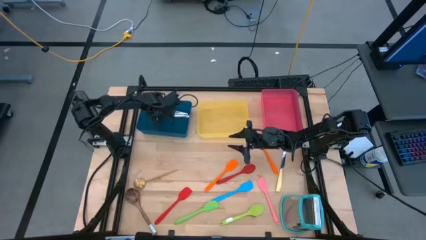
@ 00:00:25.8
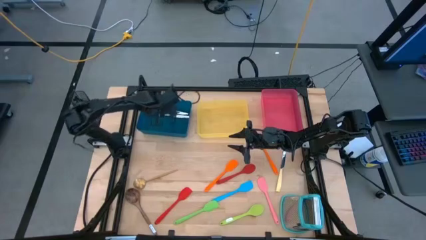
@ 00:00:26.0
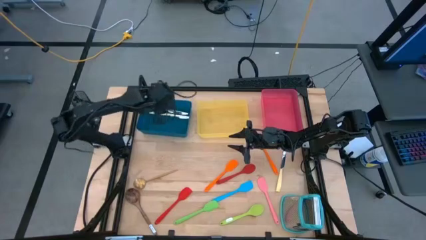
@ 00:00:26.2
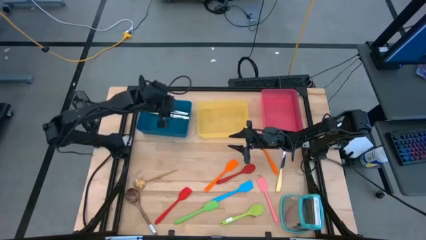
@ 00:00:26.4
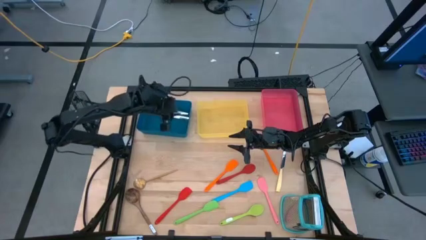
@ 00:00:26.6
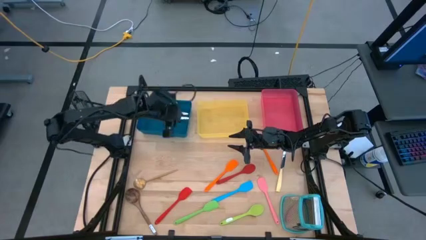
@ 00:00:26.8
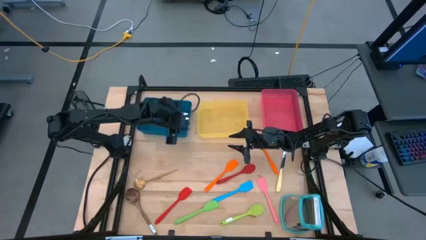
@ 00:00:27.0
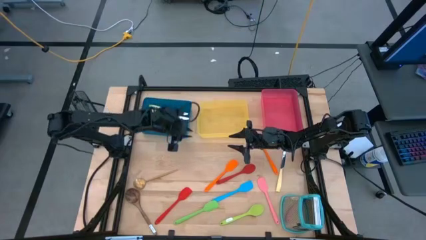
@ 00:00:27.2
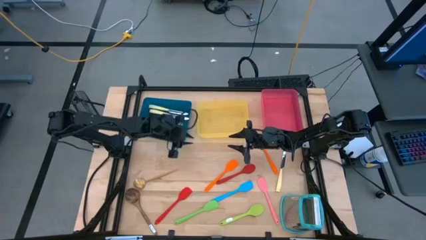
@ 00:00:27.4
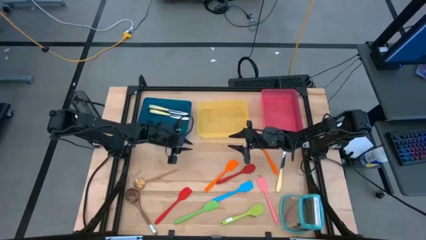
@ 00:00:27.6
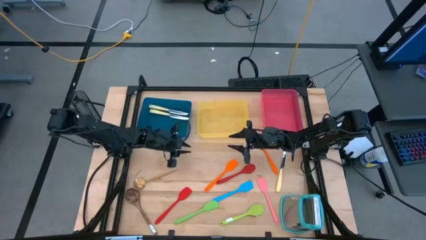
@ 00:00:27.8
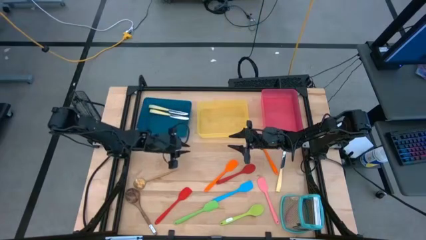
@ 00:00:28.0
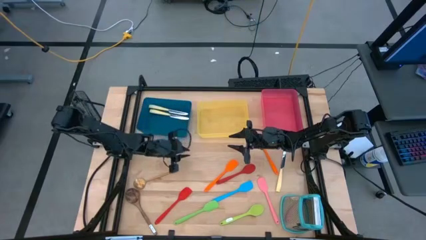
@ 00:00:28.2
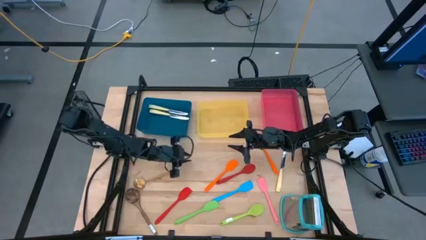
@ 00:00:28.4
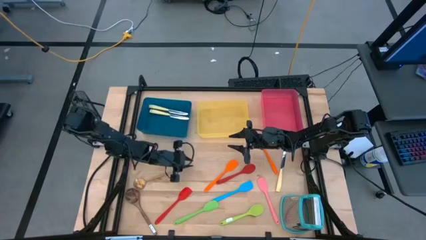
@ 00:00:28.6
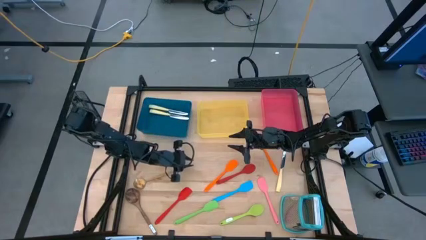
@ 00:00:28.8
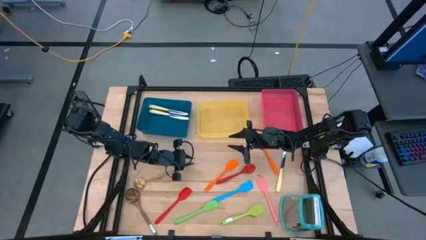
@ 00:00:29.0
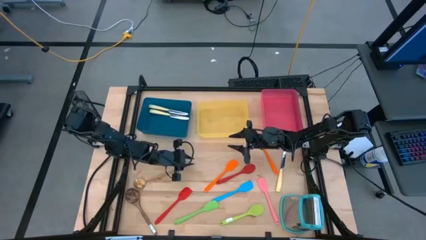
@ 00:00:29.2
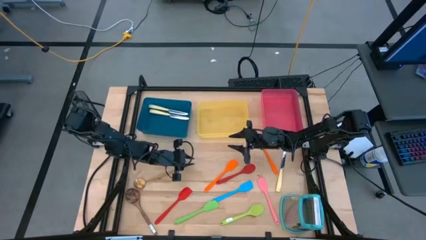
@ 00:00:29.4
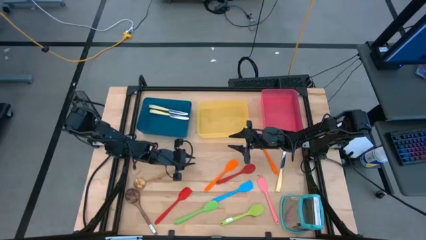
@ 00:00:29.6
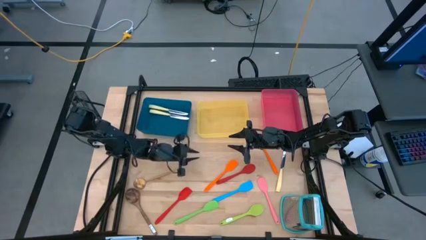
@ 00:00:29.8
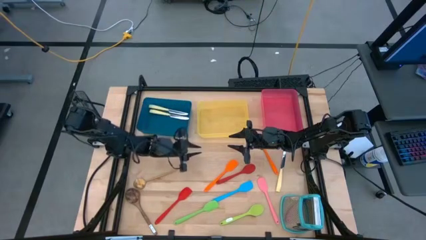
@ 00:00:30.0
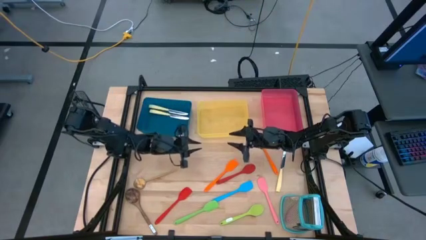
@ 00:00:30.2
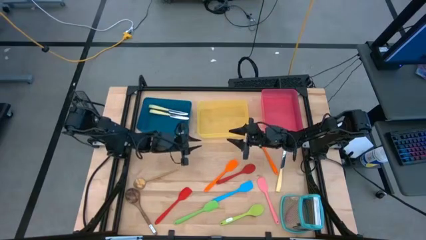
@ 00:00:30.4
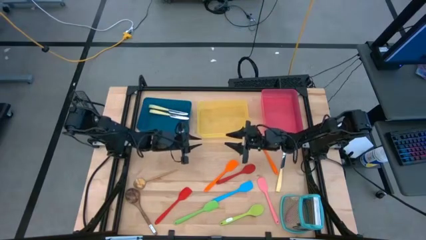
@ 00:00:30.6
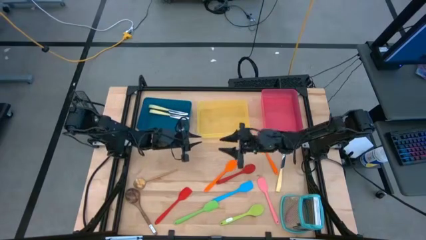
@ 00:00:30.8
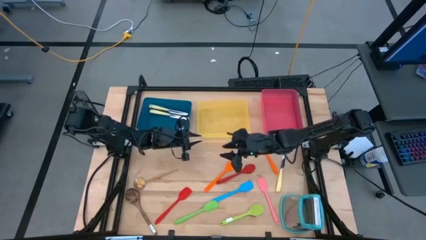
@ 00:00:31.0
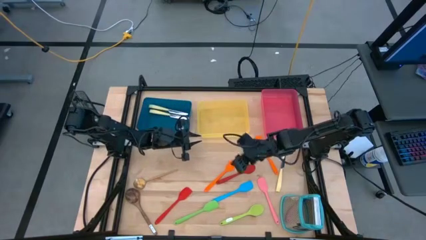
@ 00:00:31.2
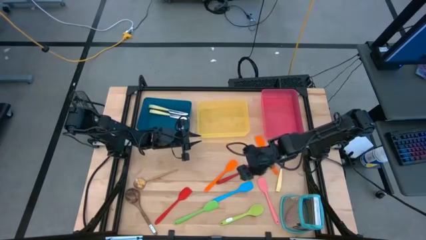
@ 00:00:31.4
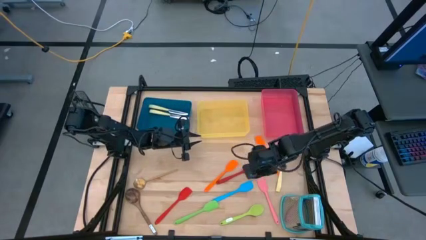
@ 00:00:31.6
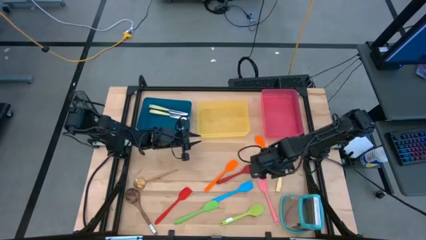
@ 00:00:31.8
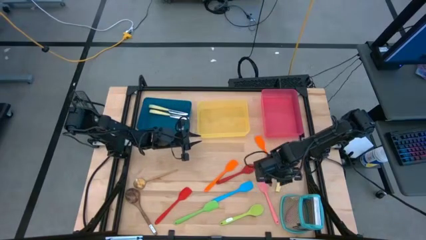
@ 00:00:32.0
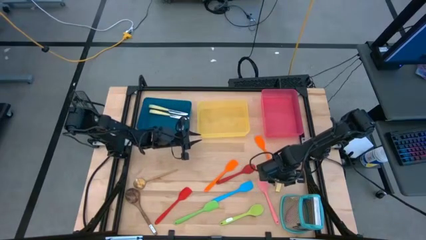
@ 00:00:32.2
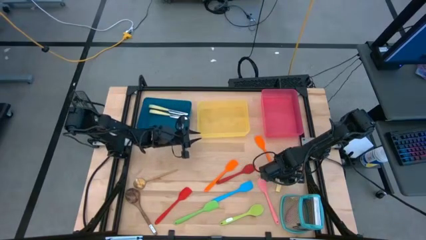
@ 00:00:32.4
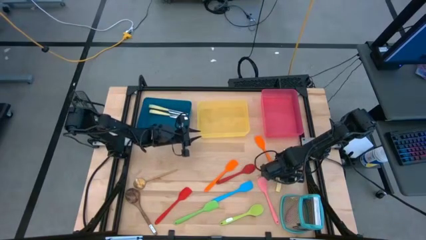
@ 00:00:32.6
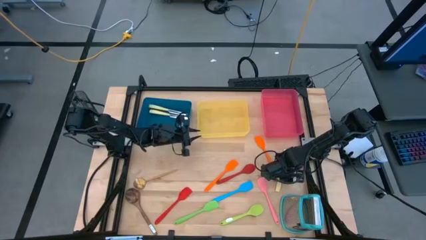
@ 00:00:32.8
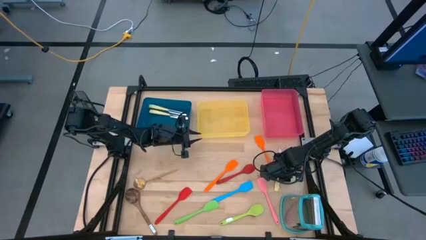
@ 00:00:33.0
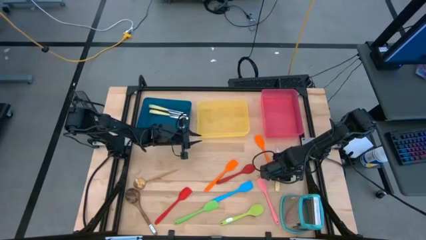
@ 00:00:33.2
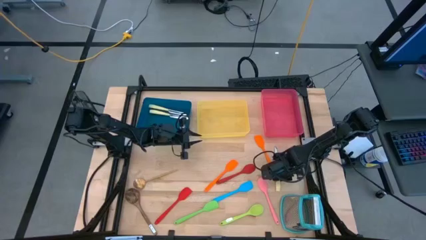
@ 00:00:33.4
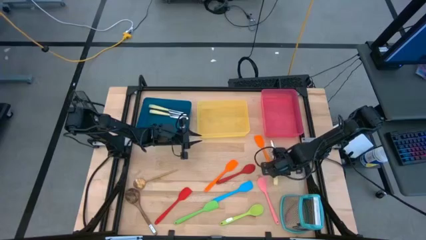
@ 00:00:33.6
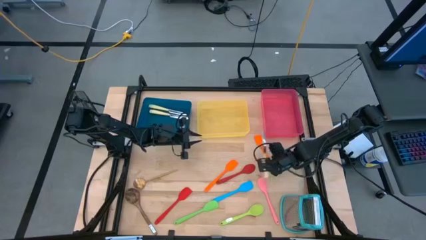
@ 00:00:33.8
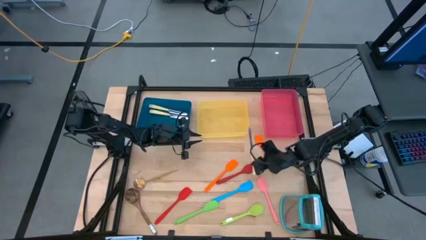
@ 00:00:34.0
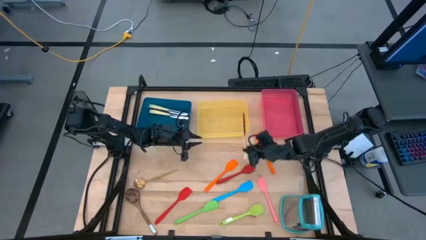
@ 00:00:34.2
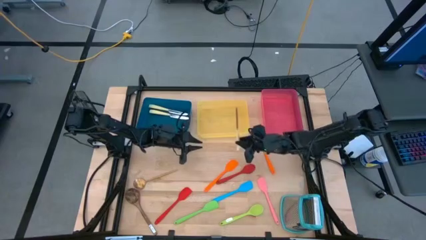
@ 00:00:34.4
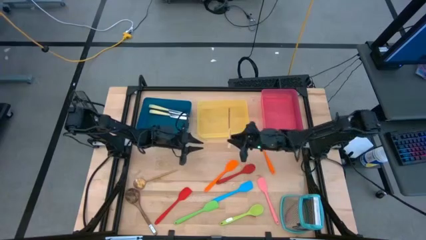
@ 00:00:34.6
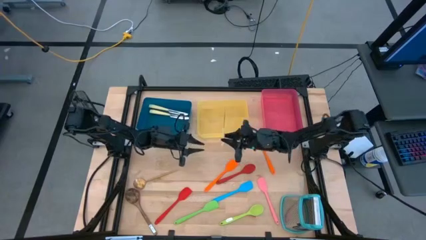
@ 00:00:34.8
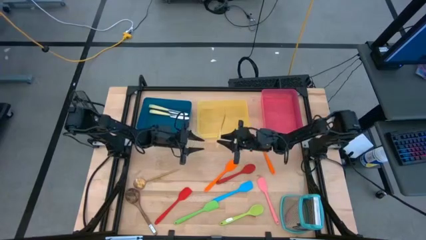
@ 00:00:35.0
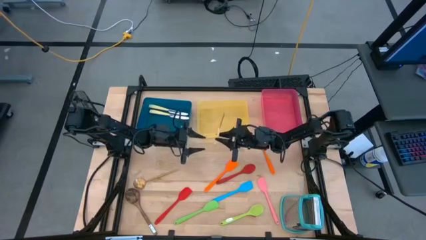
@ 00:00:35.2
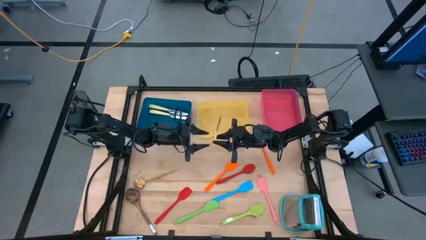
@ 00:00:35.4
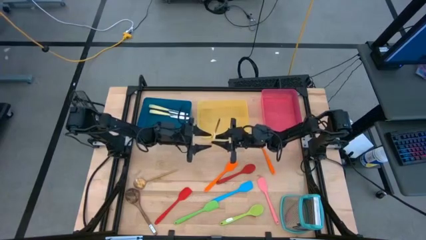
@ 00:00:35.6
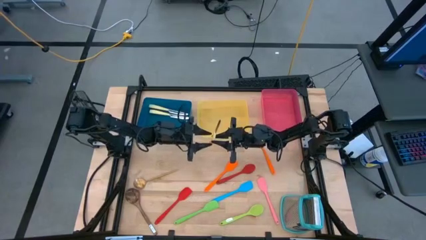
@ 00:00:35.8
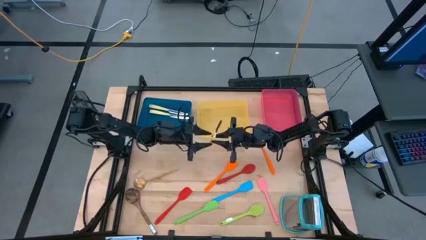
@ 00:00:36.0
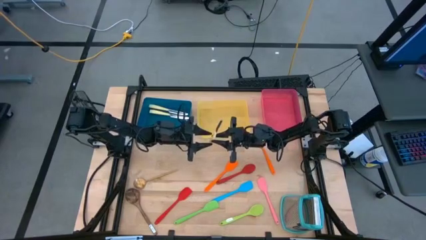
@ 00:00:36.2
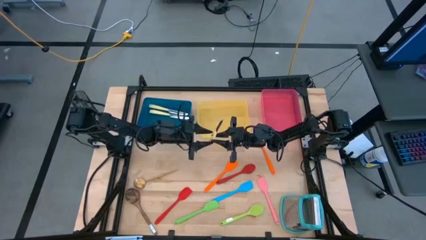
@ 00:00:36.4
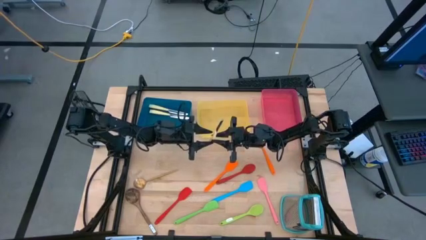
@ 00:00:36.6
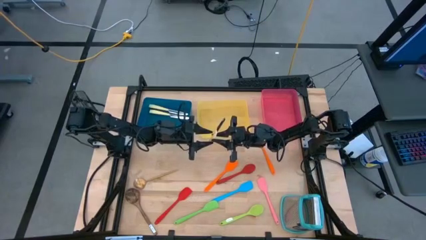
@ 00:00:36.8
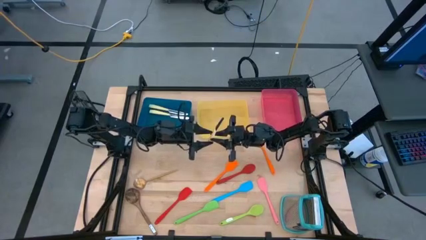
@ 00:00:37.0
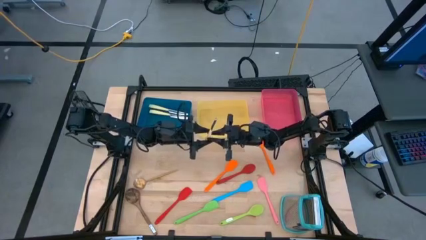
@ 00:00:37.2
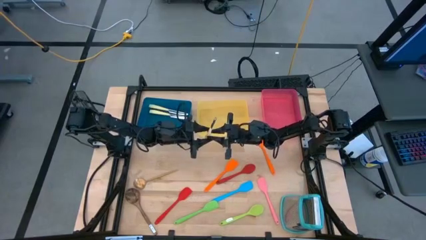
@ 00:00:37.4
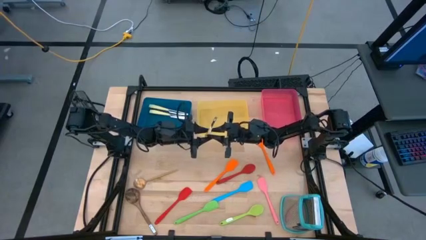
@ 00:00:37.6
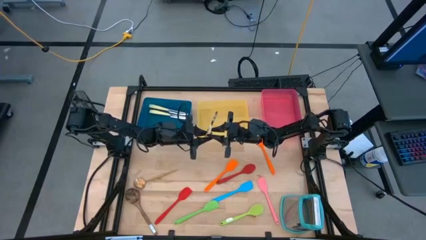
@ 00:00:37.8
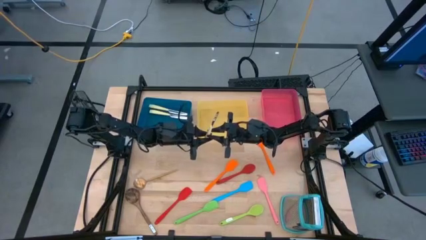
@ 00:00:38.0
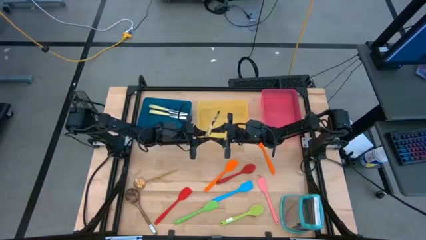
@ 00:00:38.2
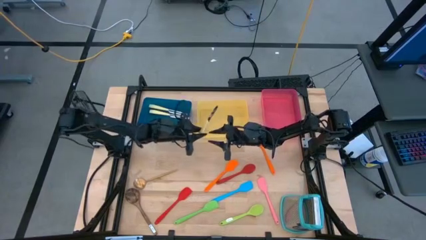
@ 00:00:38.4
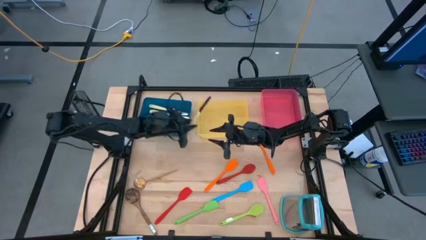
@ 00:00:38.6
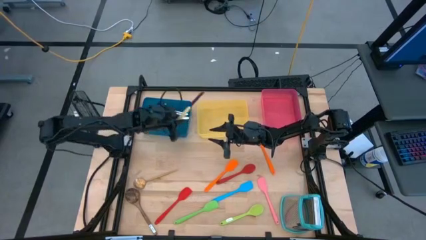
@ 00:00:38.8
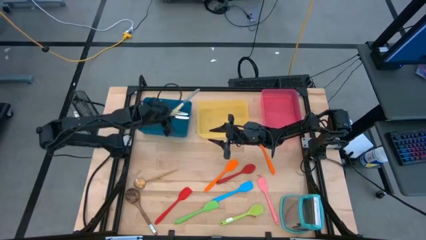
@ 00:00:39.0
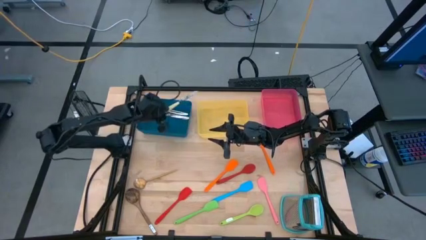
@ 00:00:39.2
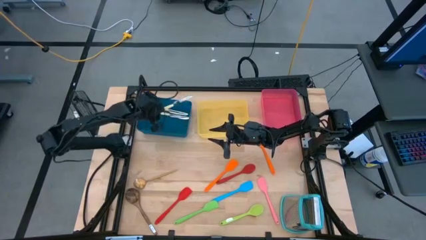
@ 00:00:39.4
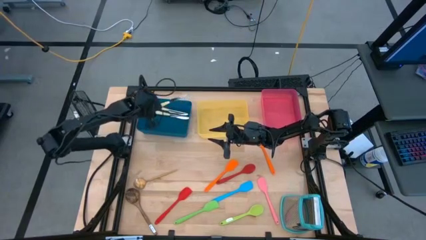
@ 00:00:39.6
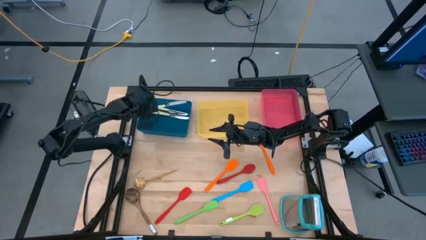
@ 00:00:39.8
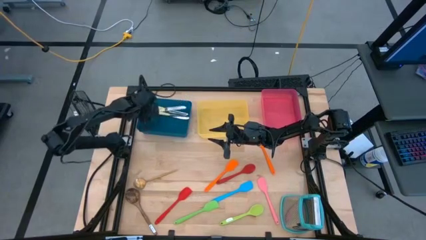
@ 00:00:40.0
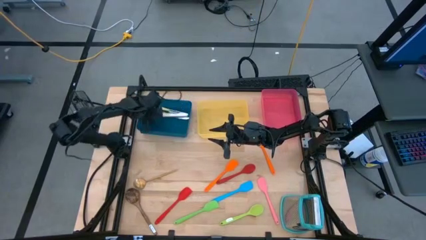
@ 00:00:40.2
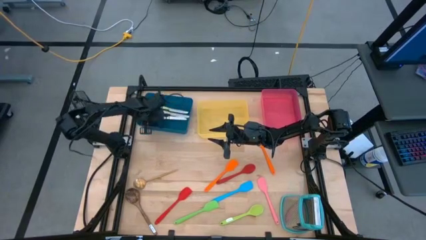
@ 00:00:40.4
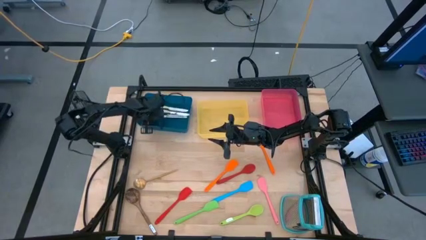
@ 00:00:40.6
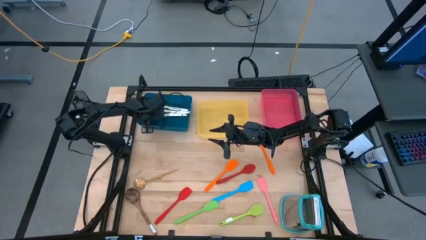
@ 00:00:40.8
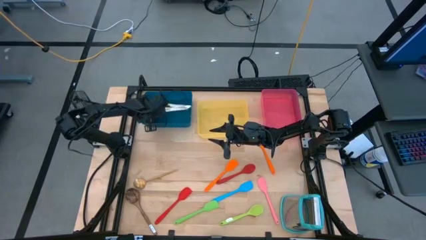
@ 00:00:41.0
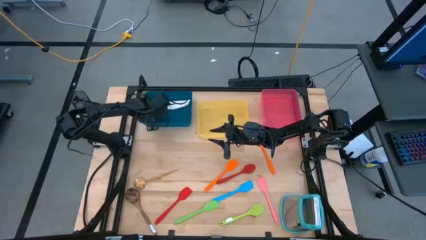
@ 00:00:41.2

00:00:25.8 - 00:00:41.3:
Task: Pick & Place Kitchen Items
Put the yellow knife into the blue bin

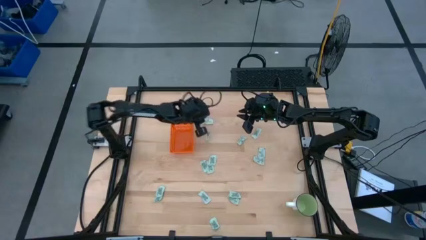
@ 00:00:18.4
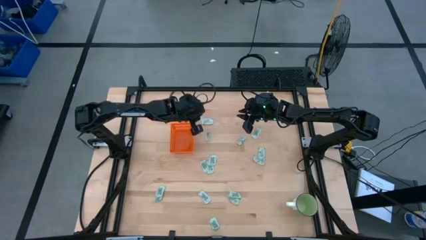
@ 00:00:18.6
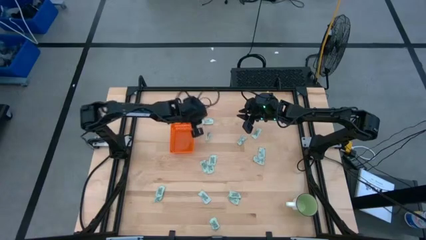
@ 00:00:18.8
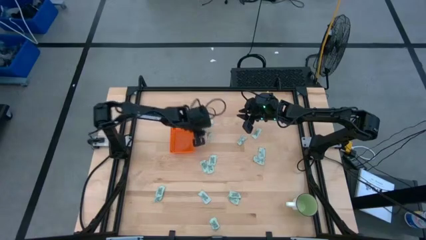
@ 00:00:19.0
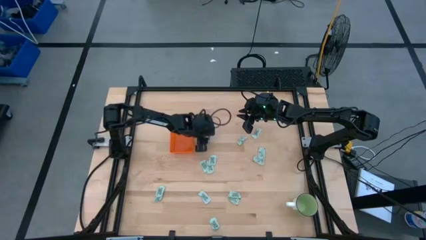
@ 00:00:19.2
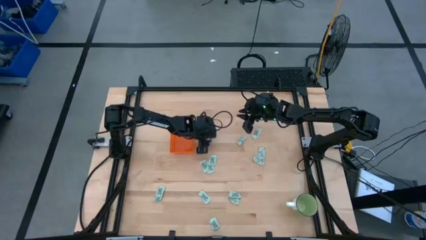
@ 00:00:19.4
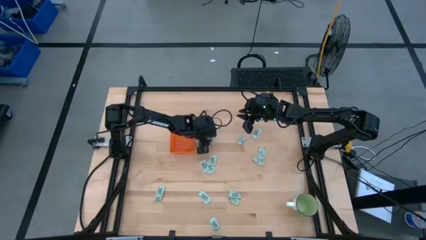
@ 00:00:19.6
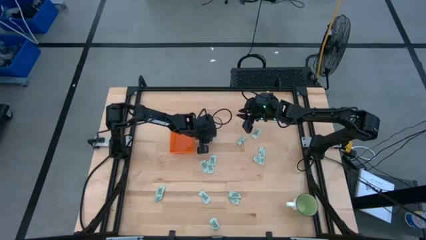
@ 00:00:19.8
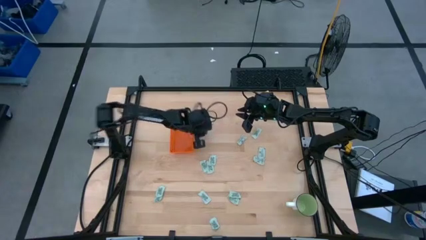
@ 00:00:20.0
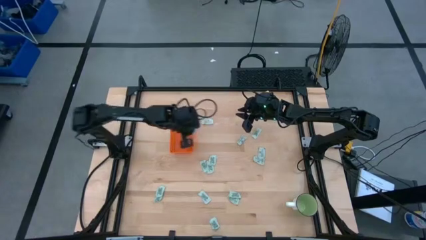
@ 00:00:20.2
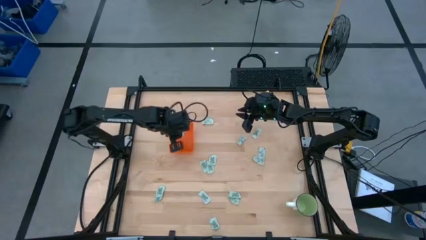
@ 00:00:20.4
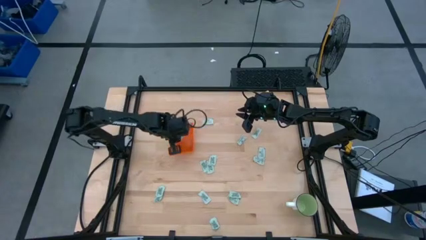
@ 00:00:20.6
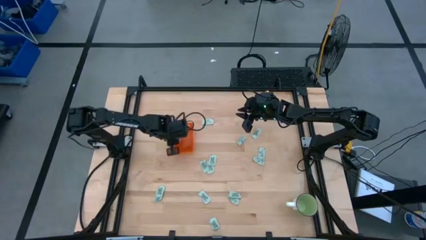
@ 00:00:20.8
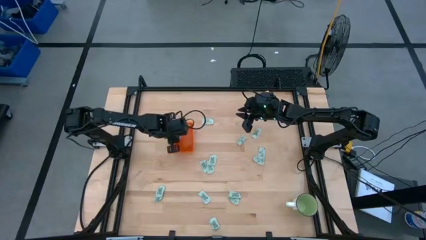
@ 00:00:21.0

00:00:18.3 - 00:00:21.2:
Task: Pick and place Stevia / Truvia into bins
Put the green stevia packet into the orange bin
